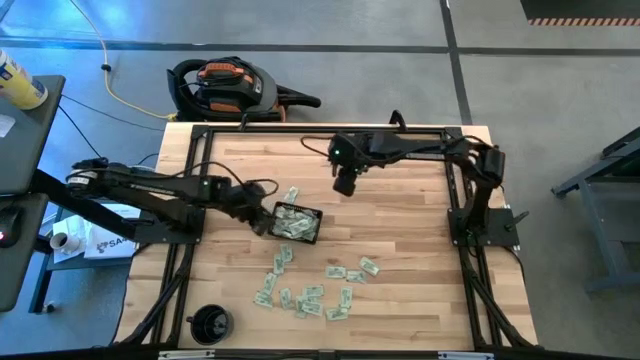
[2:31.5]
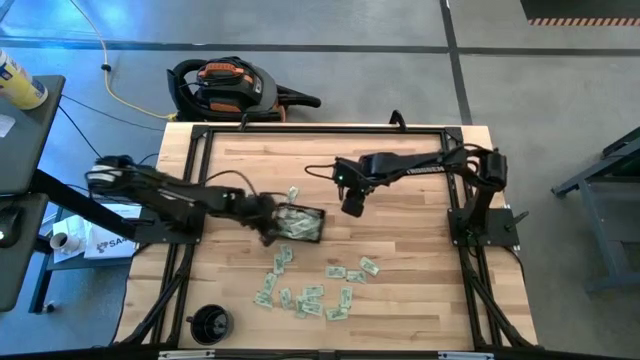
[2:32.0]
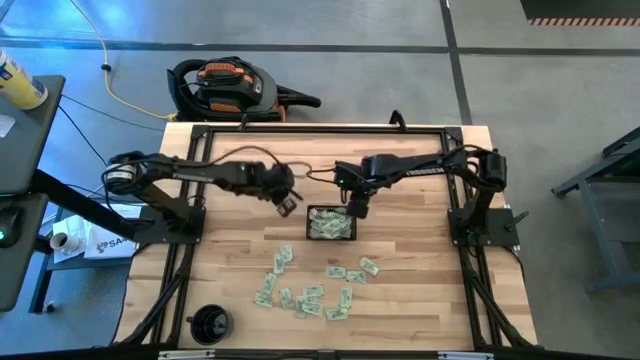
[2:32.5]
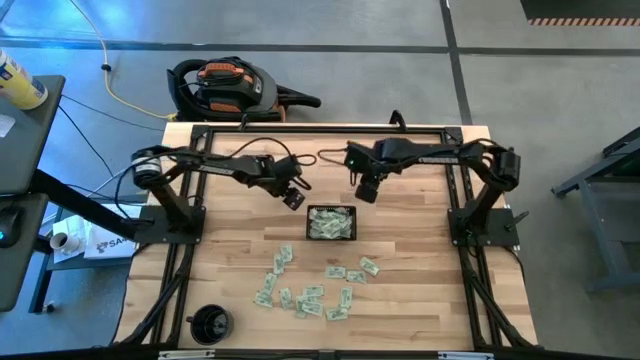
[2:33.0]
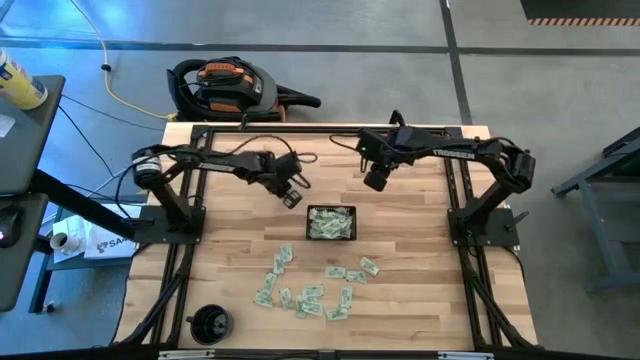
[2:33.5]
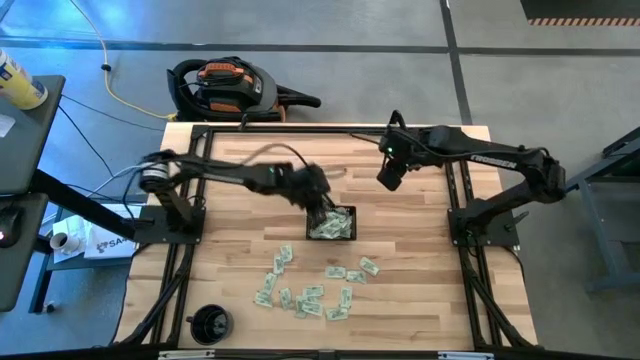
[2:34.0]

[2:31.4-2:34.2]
Task: Pick and place Stevia / Truvia into bins
Put the green stevia packet into the black basket

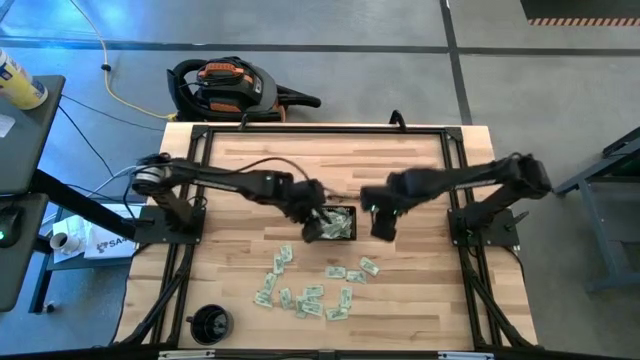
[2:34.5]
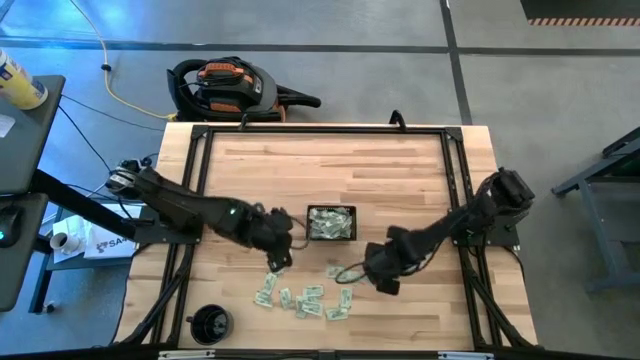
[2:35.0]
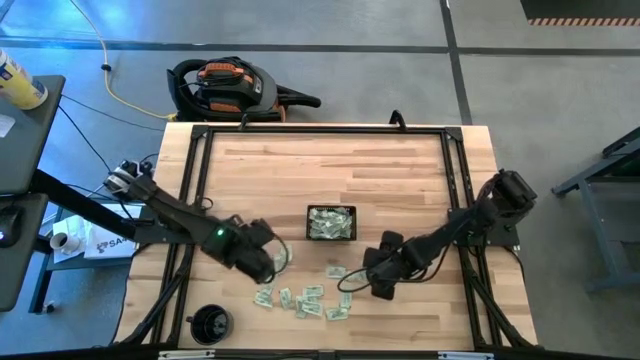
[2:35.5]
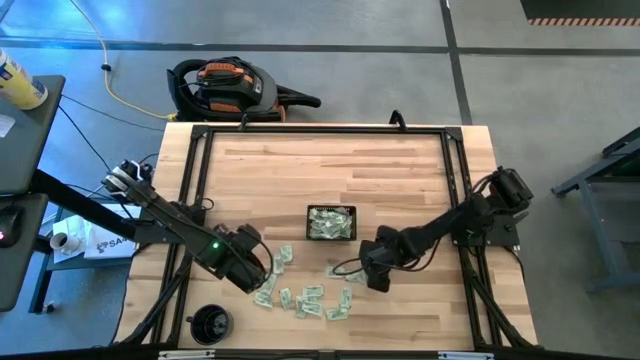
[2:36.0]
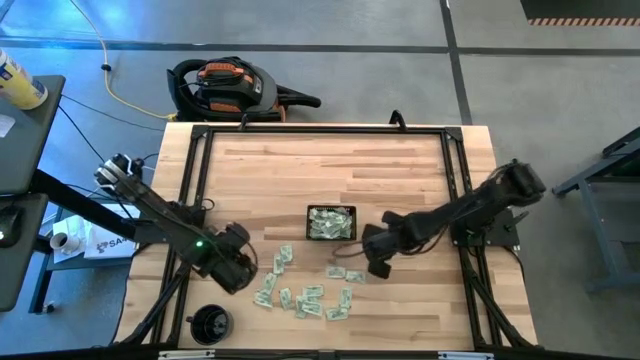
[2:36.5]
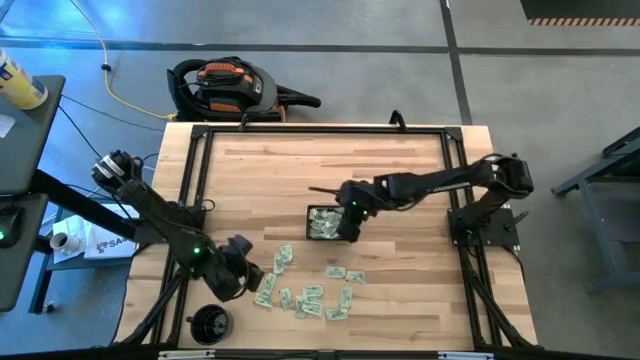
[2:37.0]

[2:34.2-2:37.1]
Put the green stevia packet into the black basket

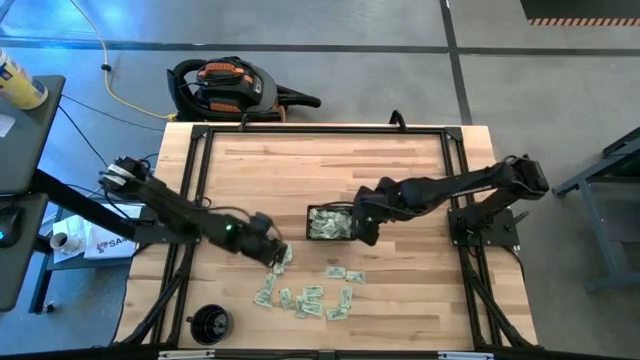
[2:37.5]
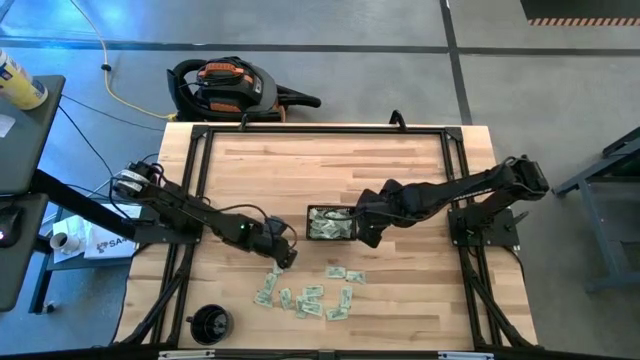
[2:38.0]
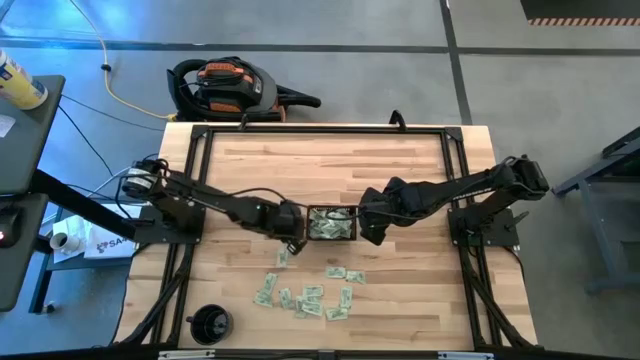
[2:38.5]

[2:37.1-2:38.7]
Put the green stevia packet into the black basket

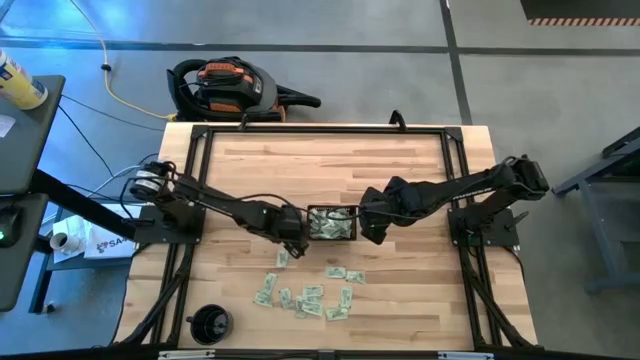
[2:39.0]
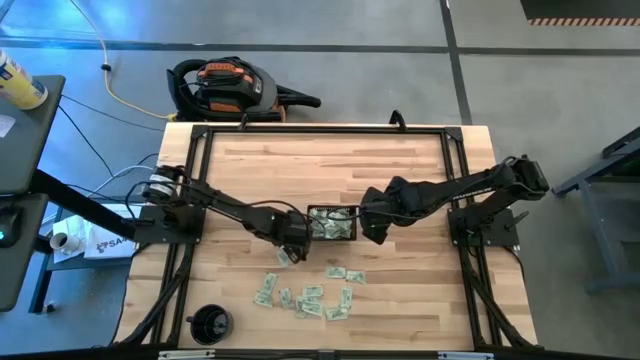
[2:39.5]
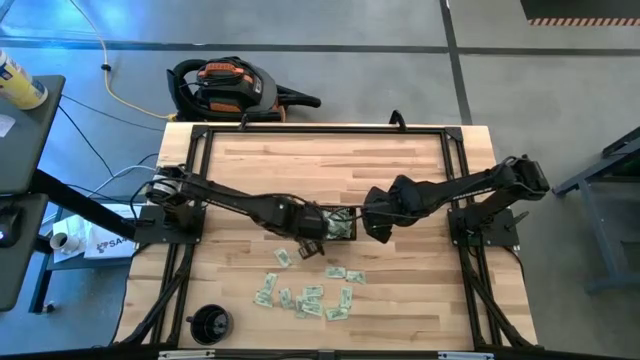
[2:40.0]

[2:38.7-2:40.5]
Put the green stevia packet into the black basket

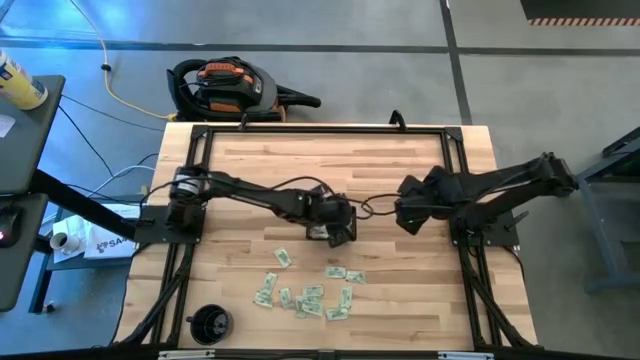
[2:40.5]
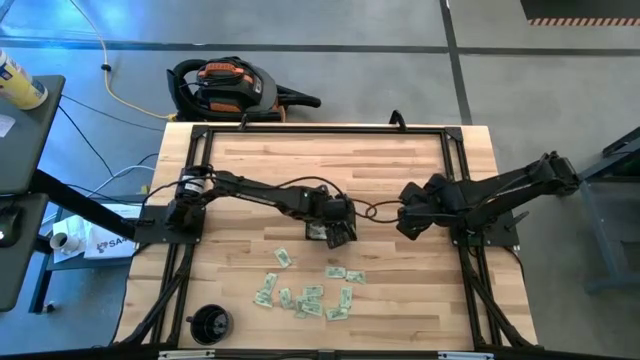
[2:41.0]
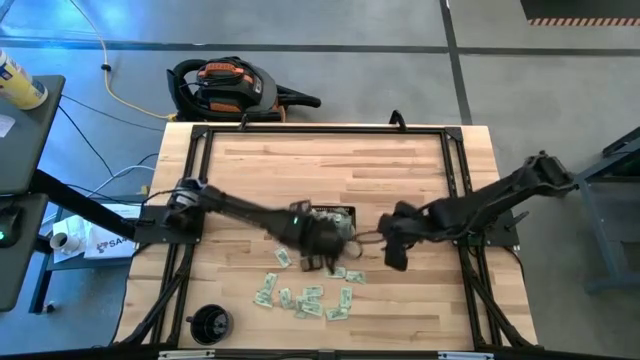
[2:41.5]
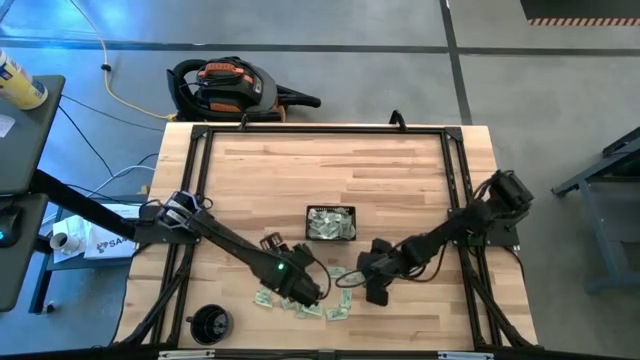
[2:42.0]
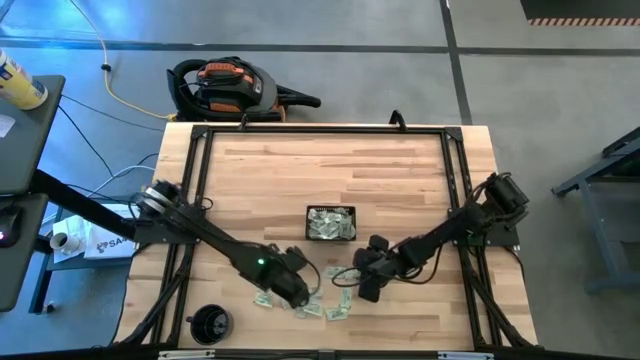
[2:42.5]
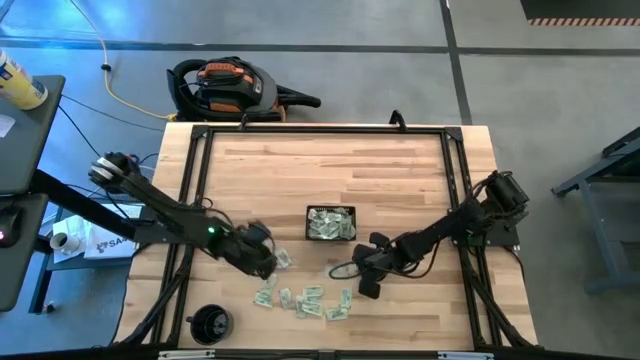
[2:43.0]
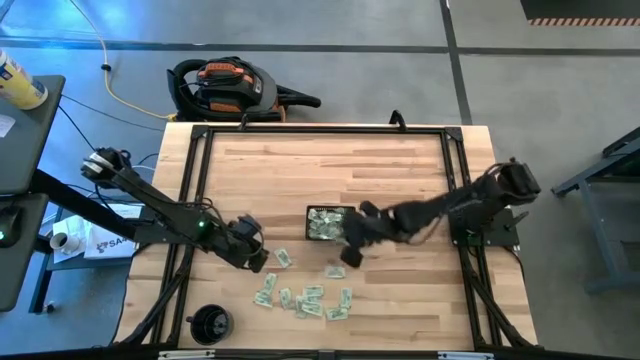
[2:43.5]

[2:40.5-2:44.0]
Put the green stevia packet into the black basket

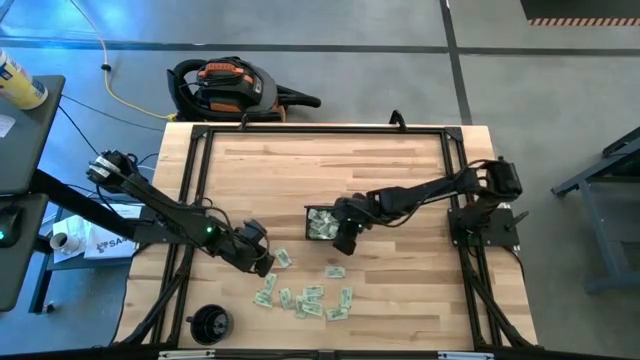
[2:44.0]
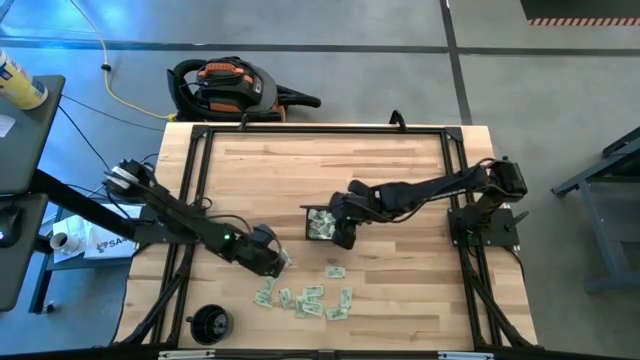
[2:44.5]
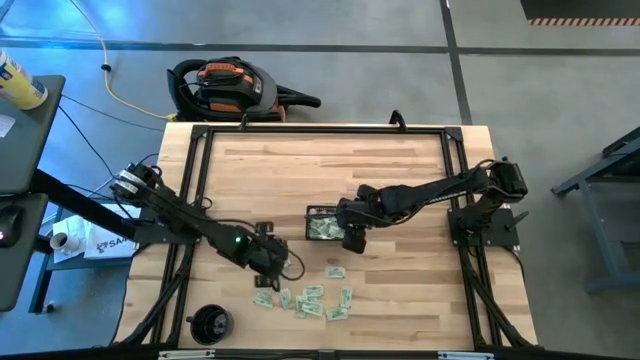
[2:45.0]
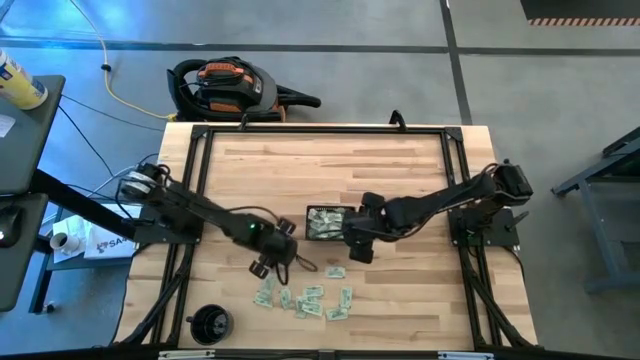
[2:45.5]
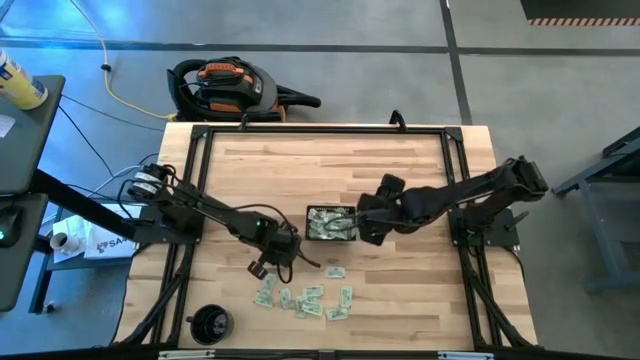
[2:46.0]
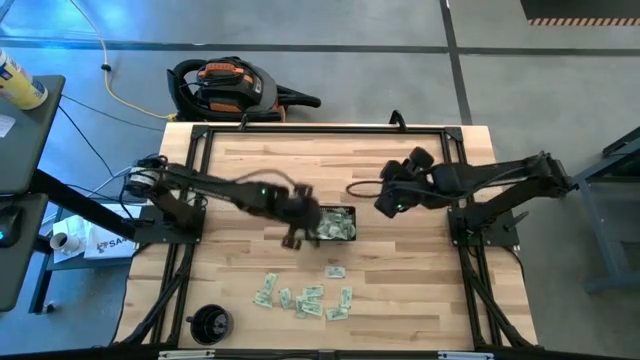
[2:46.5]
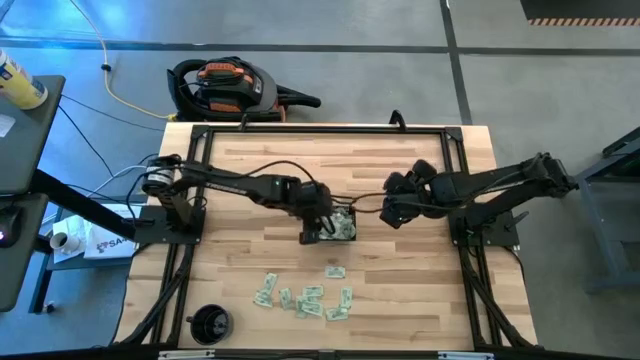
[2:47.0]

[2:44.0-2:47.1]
Put the green stevia packet into the black basket

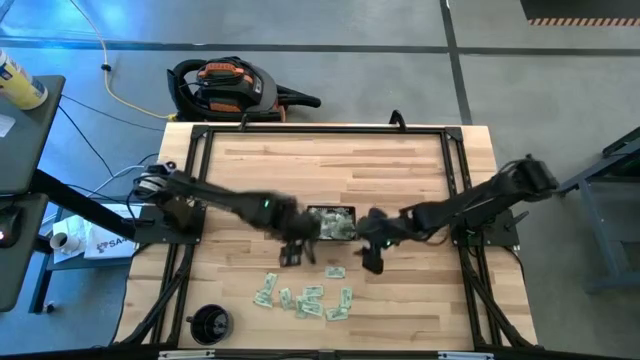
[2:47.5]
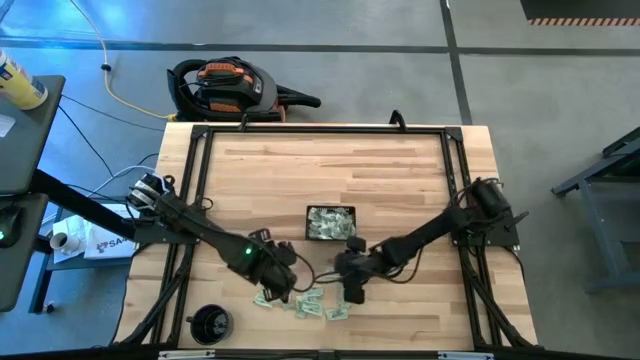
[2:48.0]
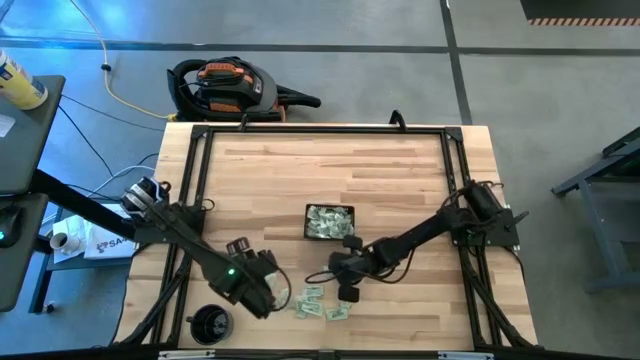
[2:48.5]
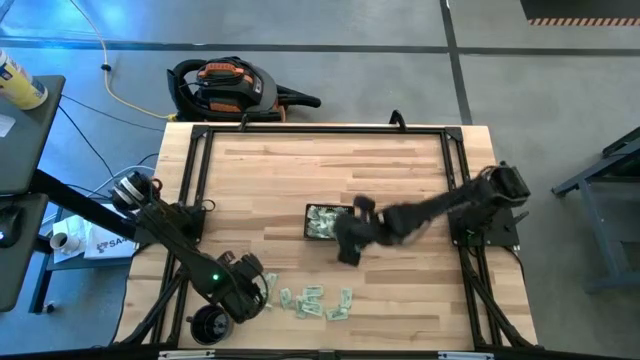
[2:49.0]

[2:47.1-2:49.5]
Put the green stevia packet into the black basket

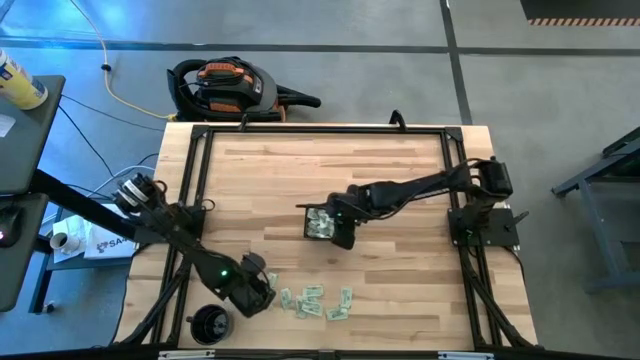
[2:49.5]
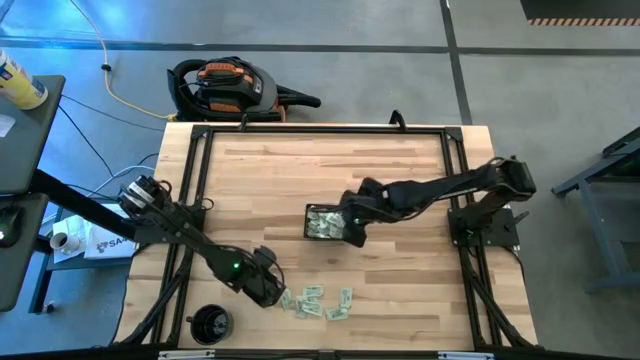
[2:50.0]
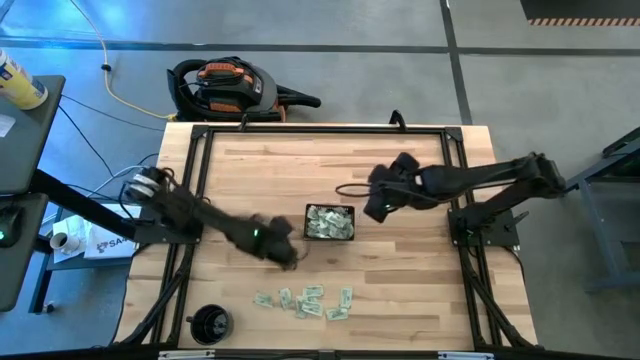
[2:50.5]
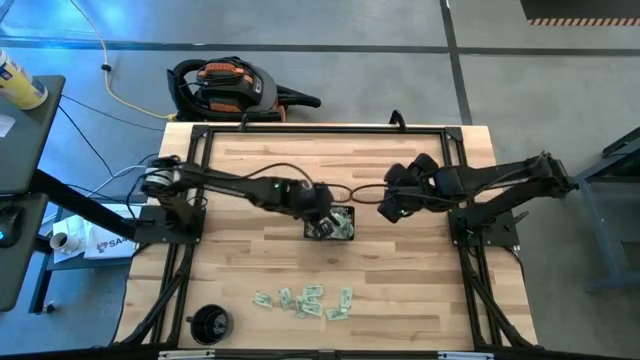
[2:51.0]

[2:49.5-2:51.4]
Put the green stevia packet into the black basket

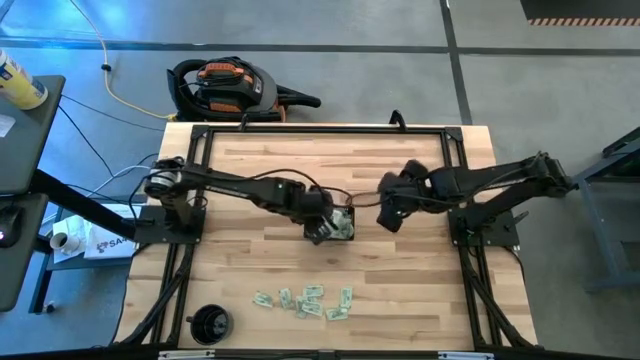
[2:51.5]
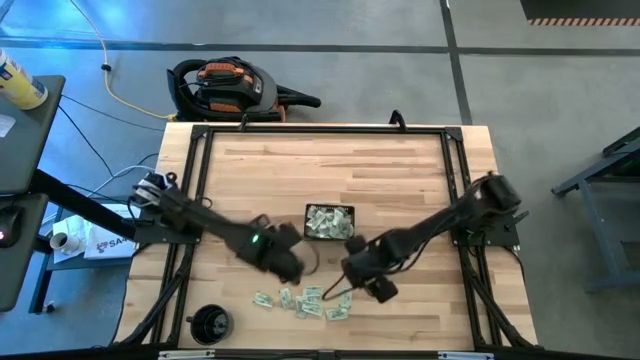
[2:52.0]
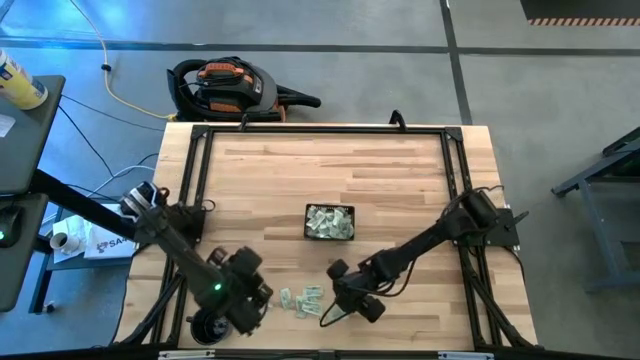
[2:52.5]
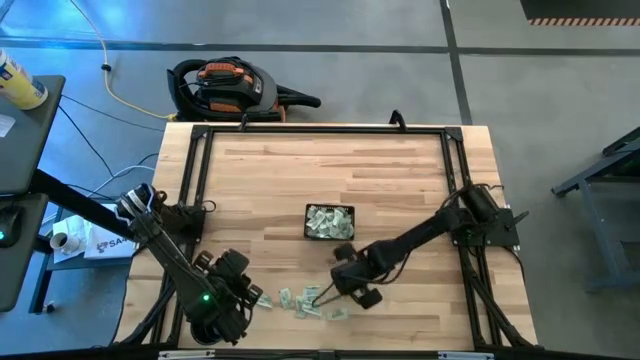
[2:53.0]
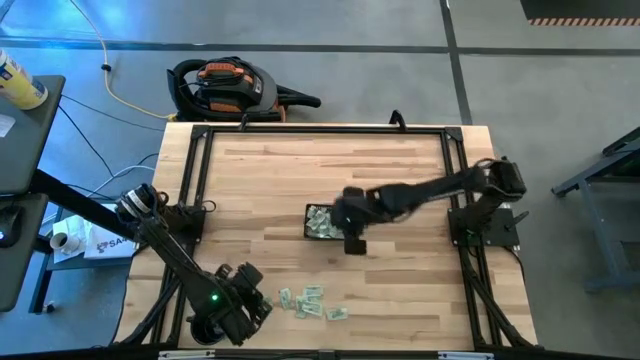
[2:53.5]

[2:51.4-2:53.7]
Put the green stevia packet into the black basket
